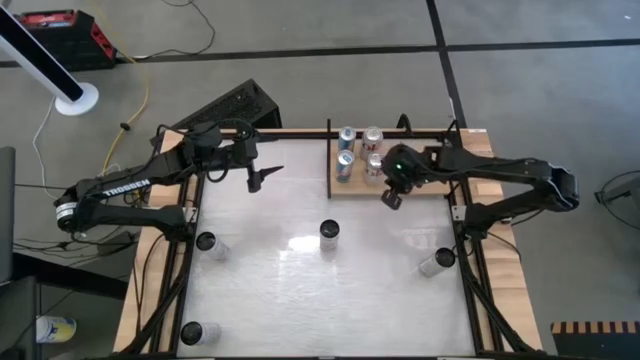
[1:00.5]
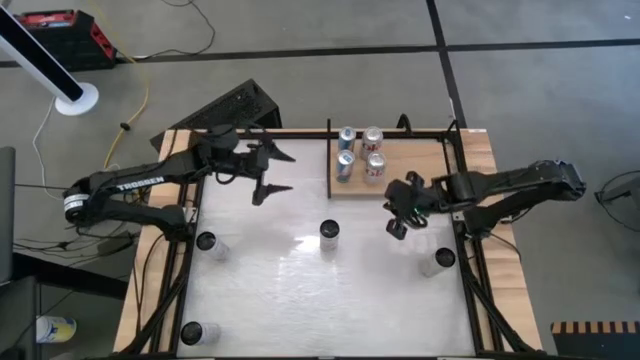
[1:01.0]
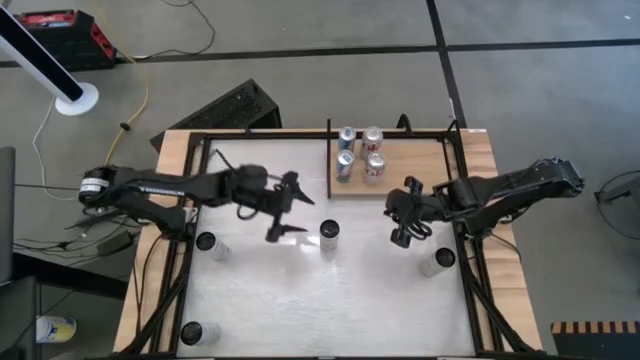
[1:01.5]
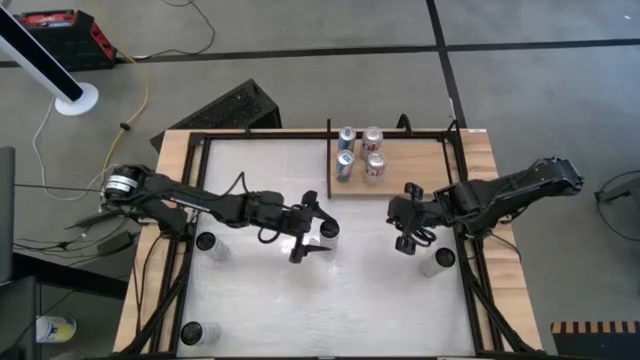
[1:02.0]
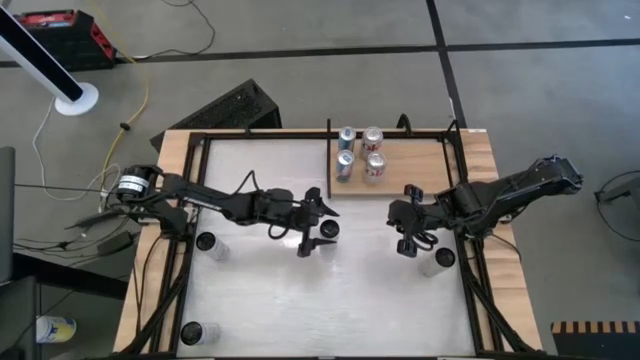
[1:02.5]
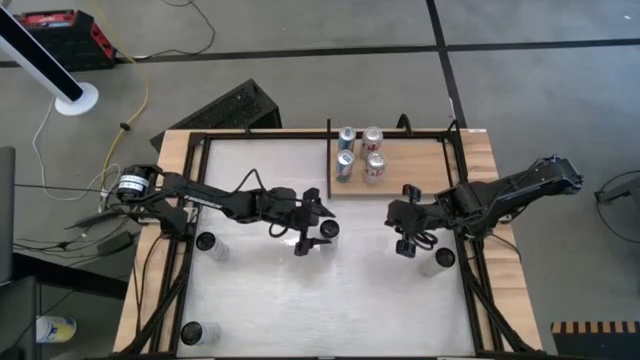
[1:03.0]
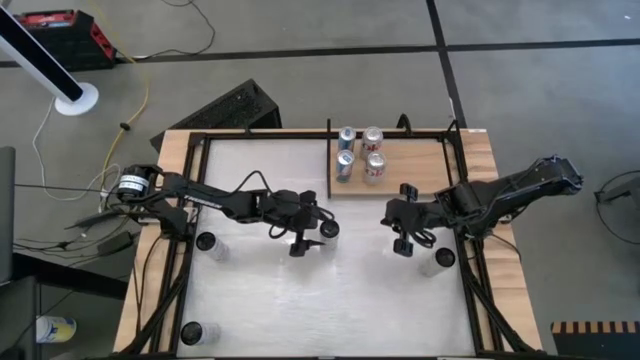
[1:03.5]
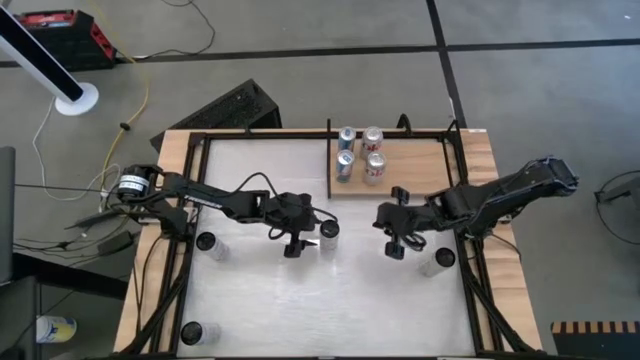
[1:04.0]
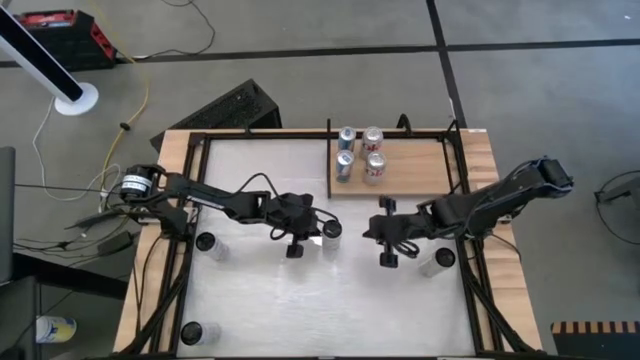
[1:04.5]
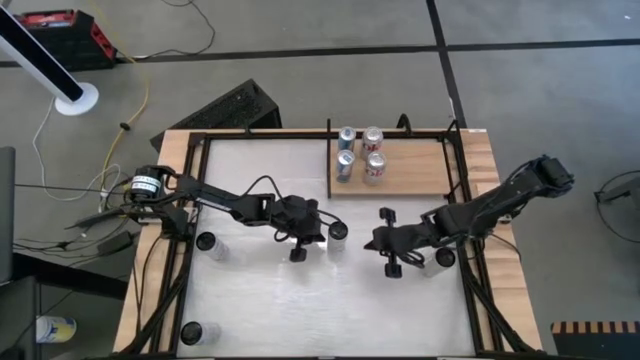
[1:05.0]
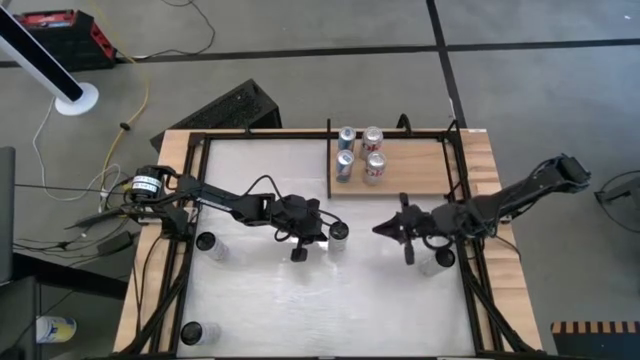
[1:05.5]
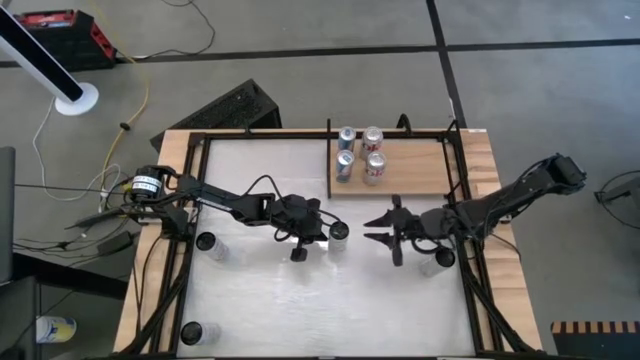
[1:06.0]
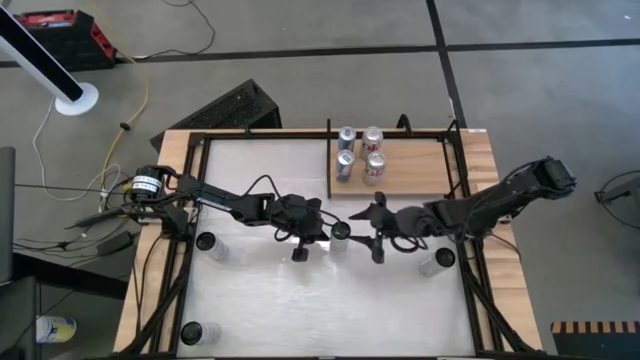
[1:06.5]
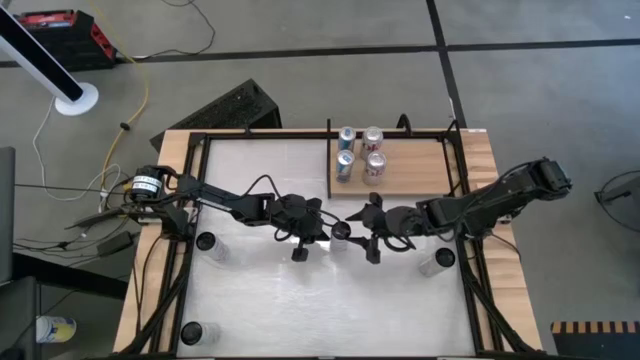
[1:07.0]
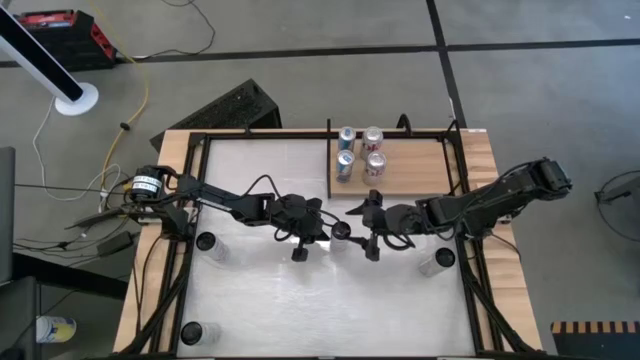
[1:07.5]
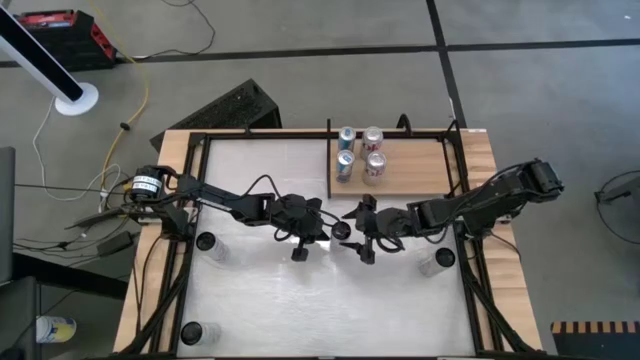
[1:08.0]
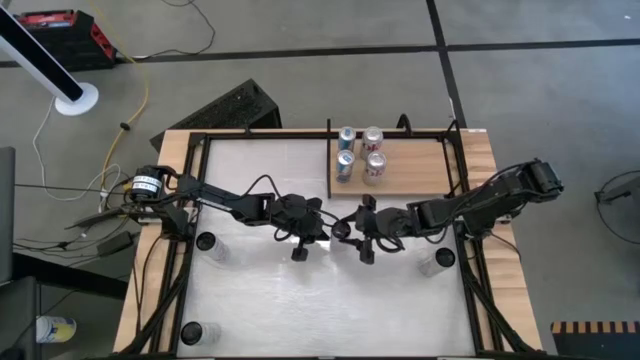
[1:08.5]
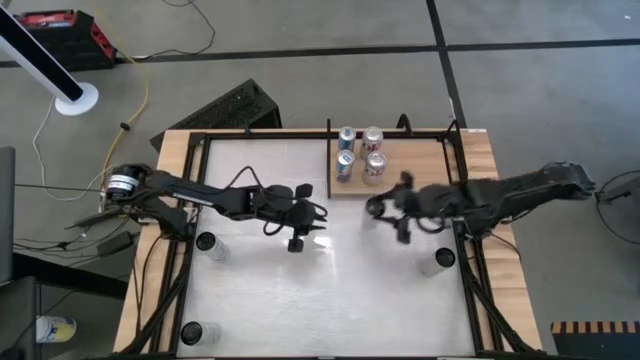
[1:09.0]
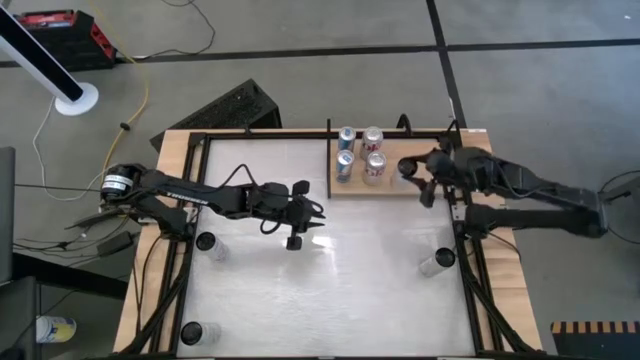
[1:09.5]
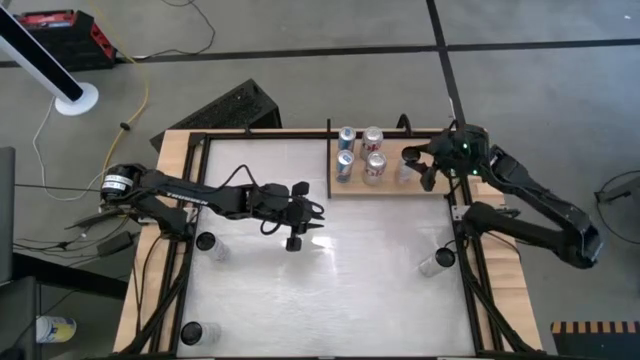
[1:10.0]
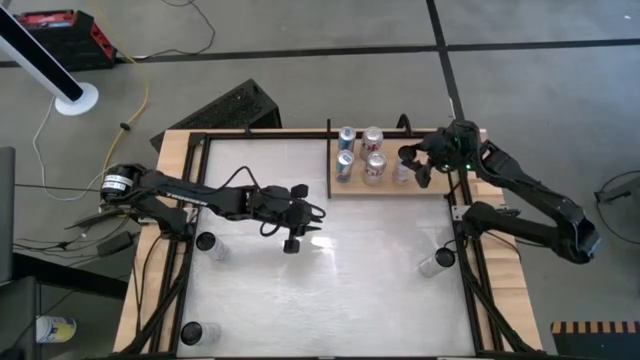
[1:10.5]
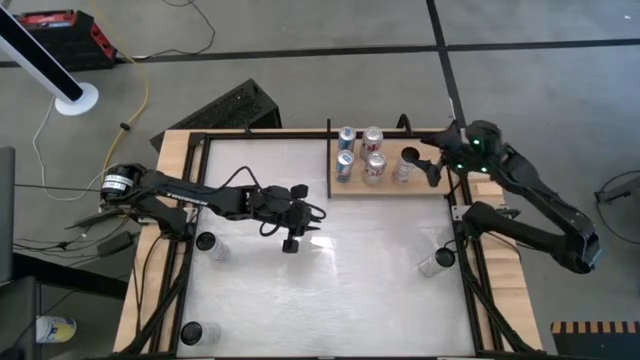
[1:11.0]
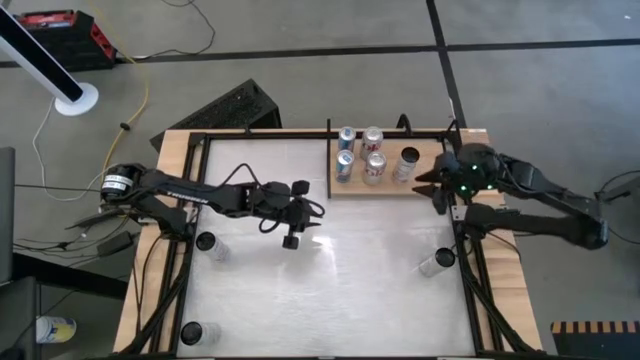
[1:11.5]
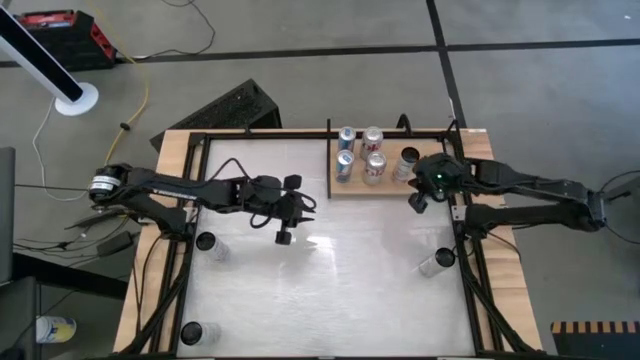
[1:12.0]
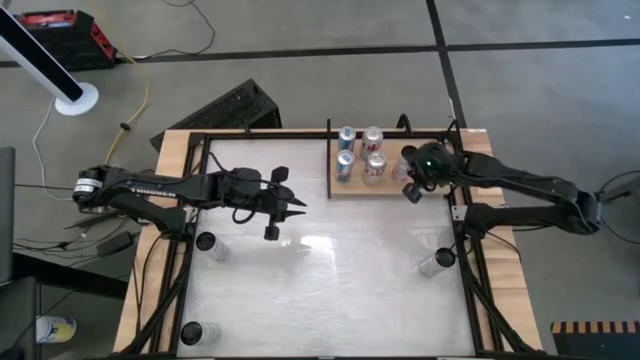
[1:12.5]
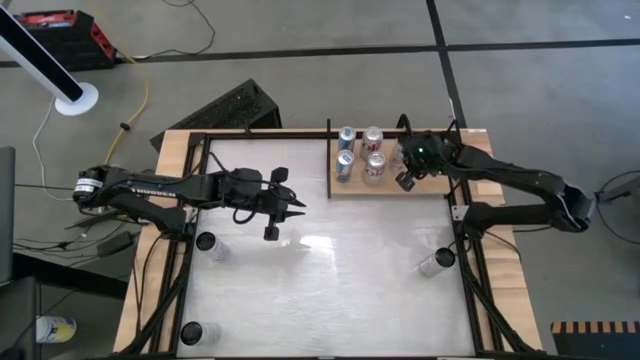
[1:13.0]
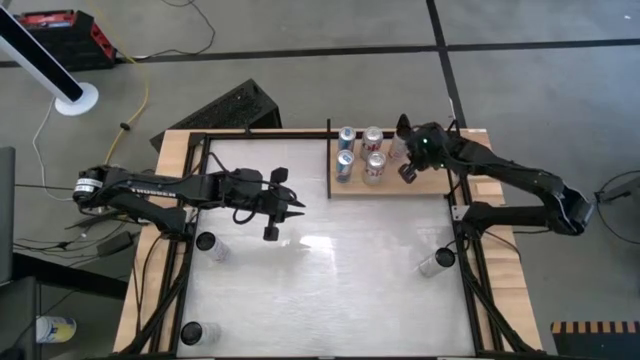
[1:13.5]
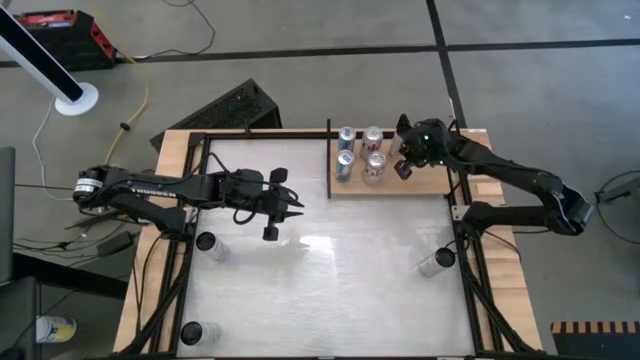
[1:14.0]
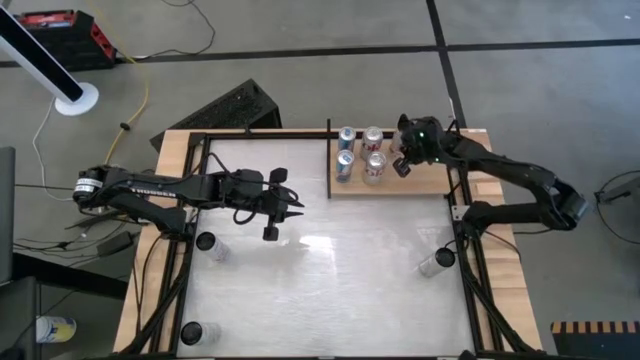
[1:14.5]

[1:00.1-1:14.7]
Task: Place canned beverage on shelf
Put the right white-pink soda can

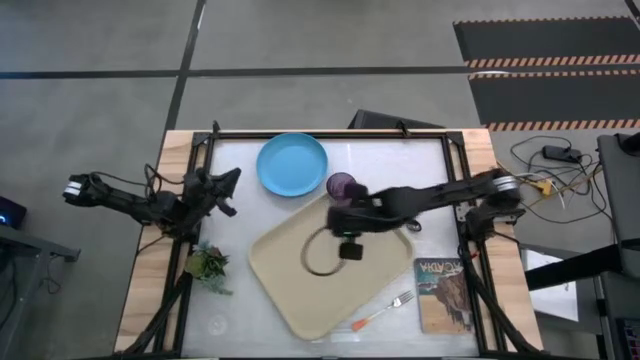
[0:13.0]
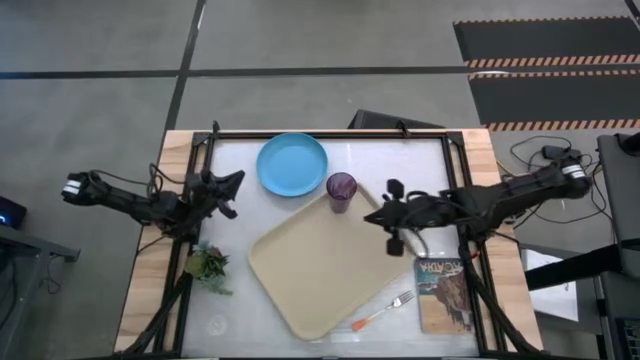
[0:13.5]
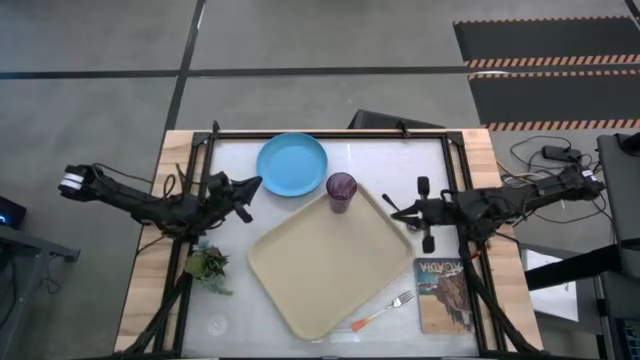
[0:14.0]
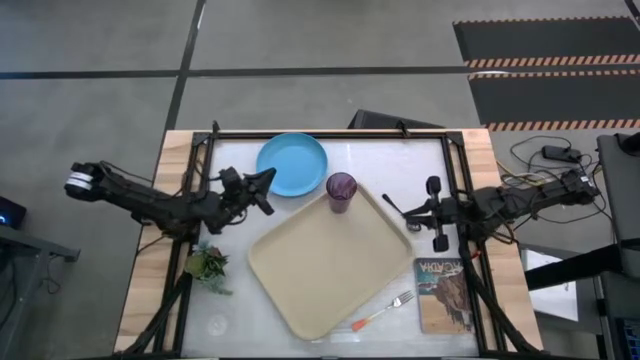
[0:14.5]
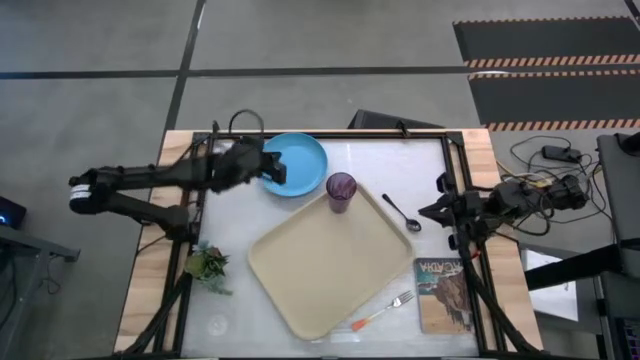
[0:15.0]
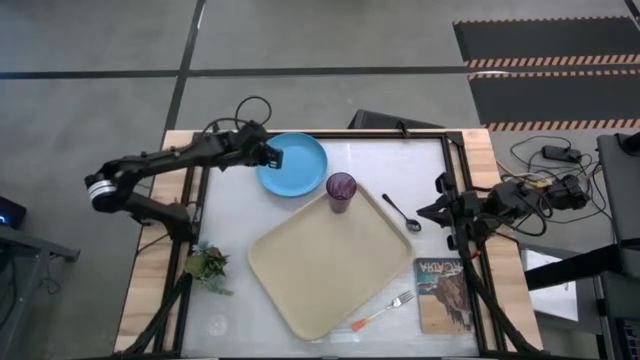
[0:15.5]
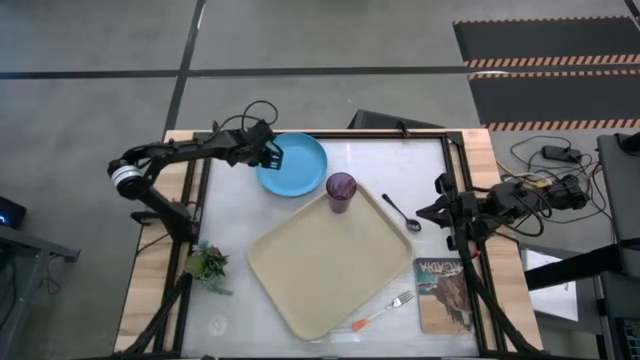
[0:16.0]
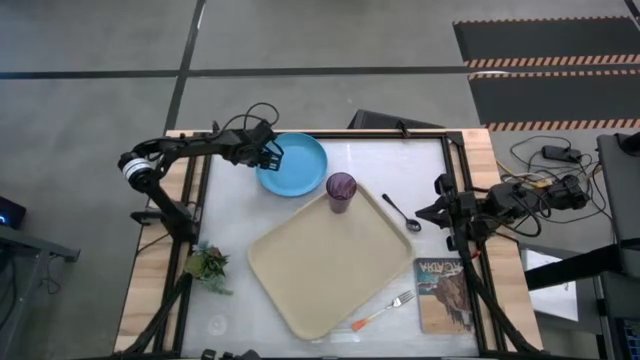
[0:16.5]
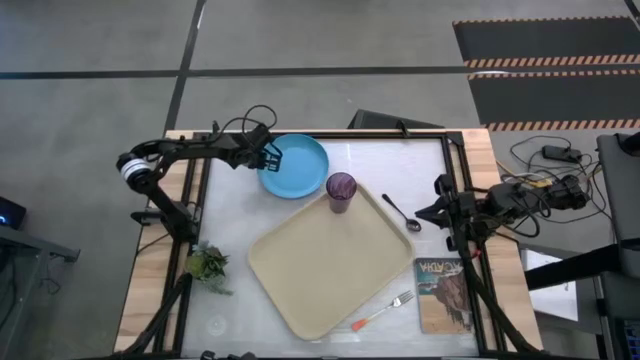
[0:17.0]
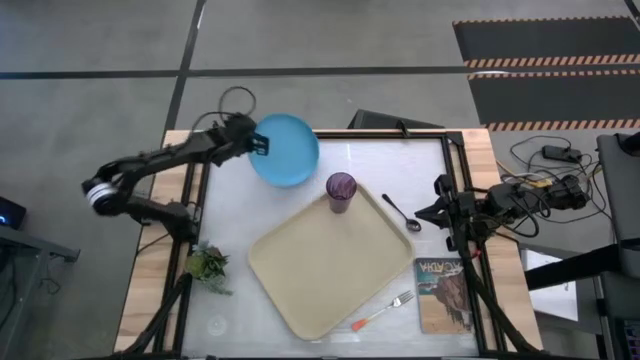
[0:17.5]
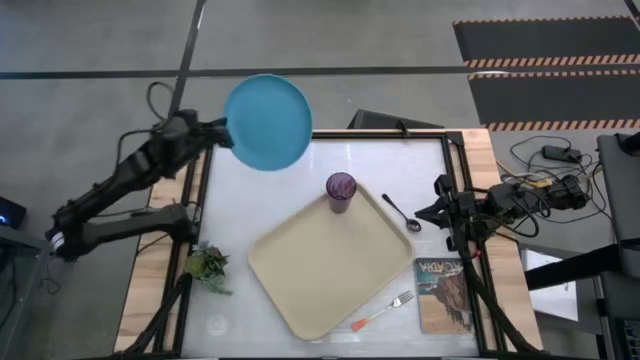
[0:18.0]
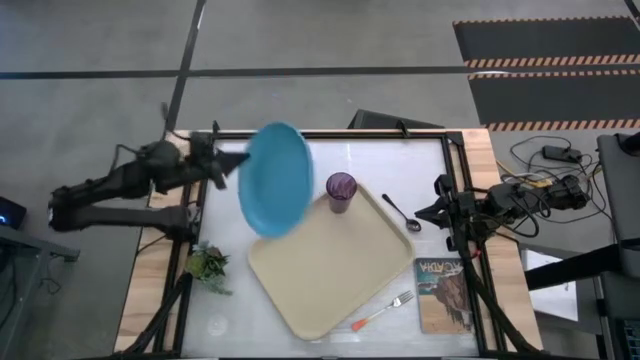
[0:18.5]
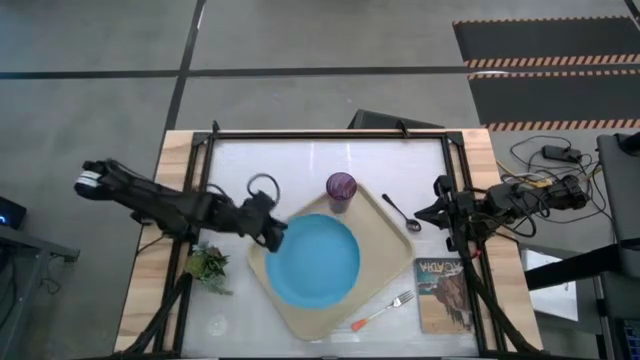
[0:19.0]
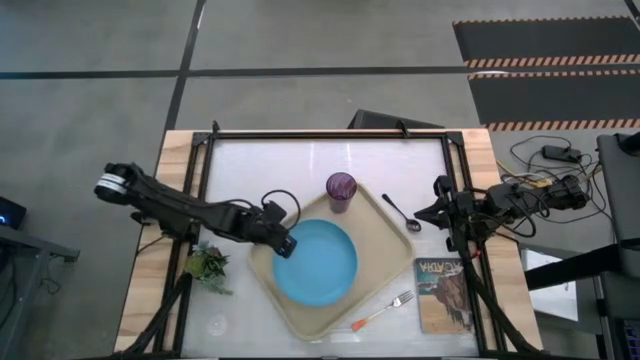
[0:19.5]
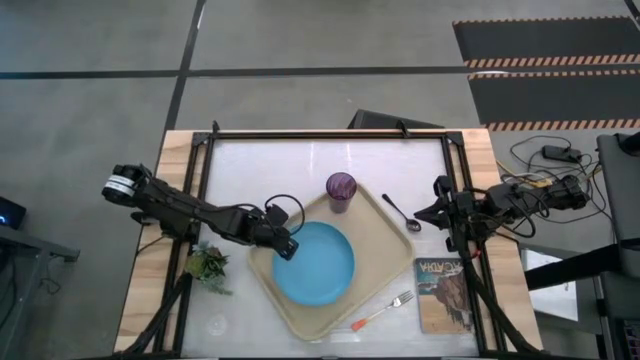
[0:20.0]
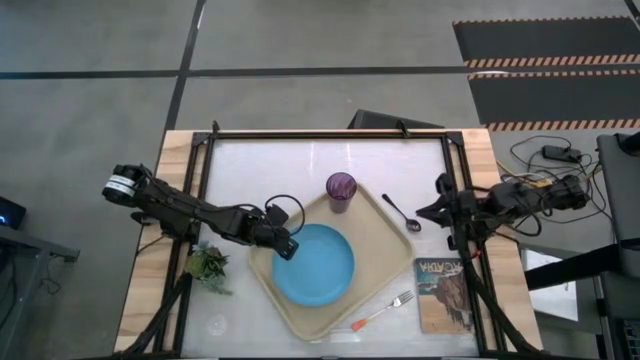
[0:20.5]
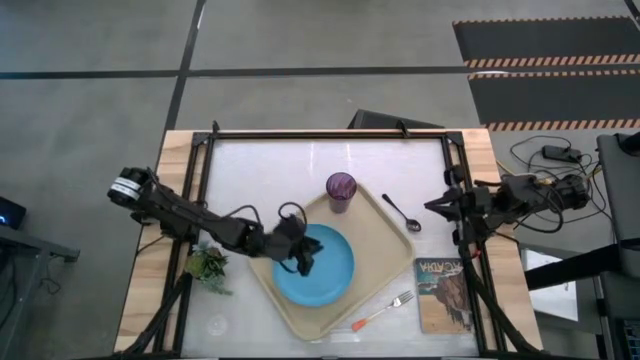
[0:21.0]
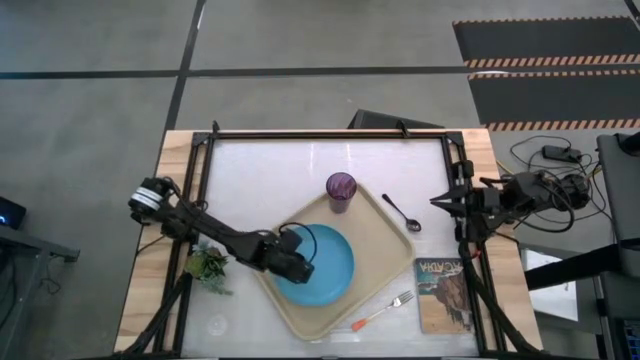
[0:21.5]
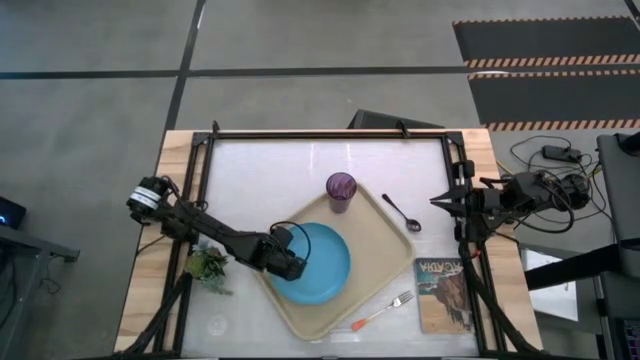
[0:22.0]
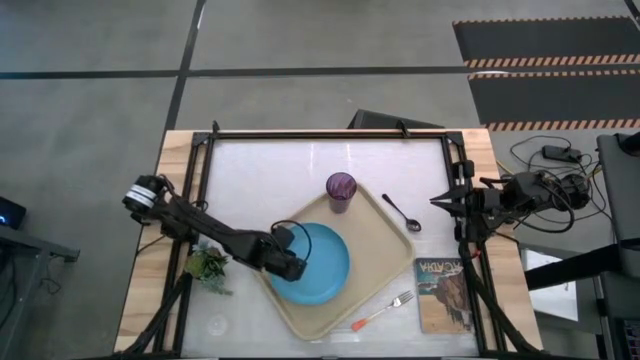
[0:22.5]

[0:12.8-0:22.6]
Task: Pick and place plate/cup/fork/spoon on tray
Put the blue plate on the light brown tray
